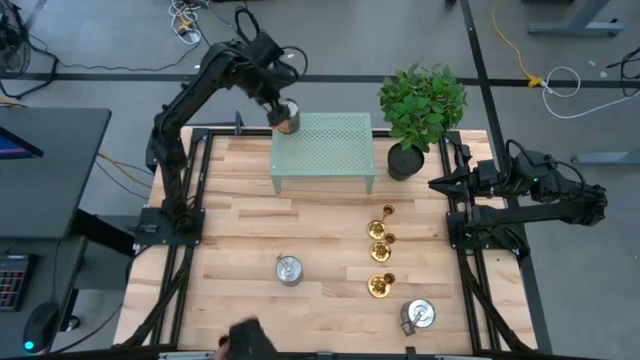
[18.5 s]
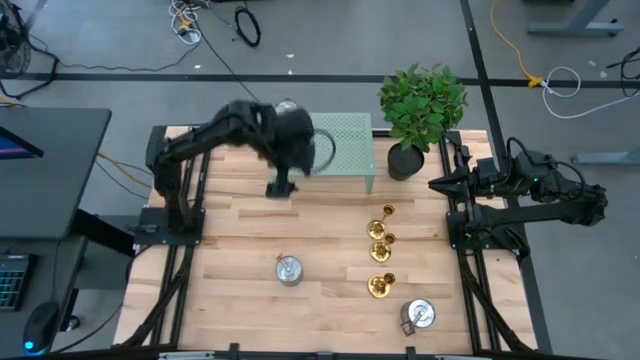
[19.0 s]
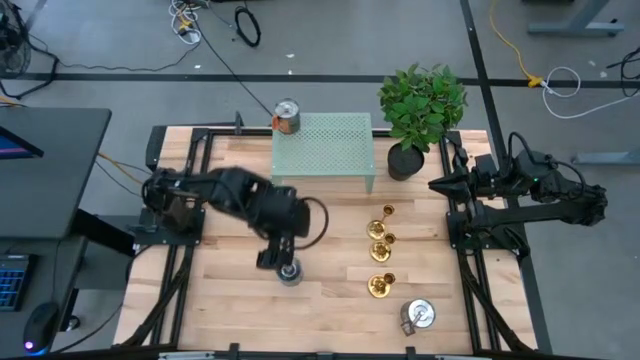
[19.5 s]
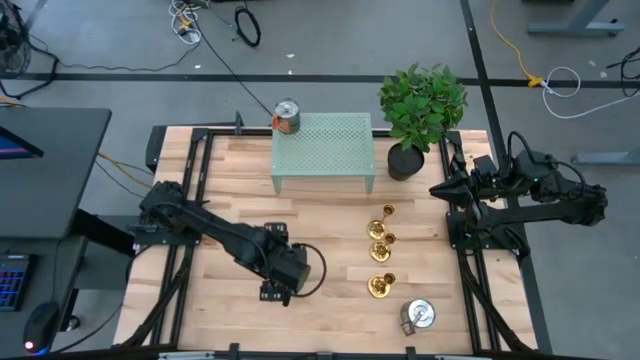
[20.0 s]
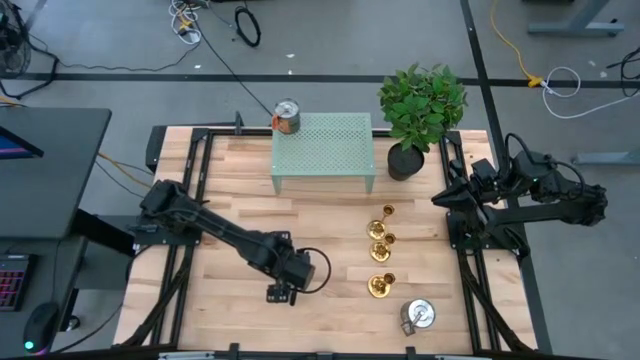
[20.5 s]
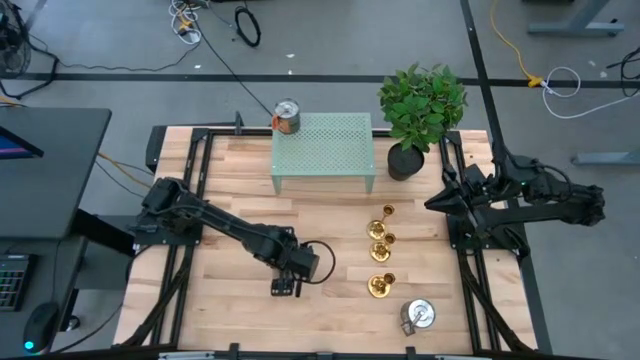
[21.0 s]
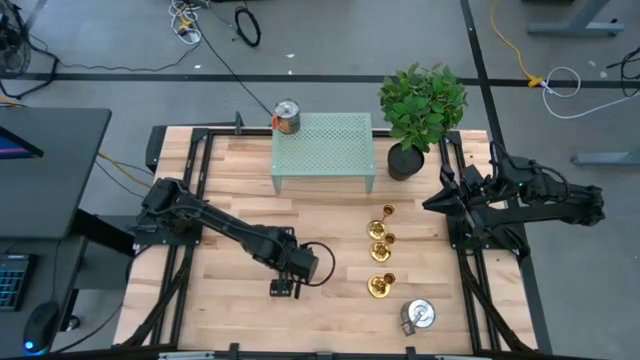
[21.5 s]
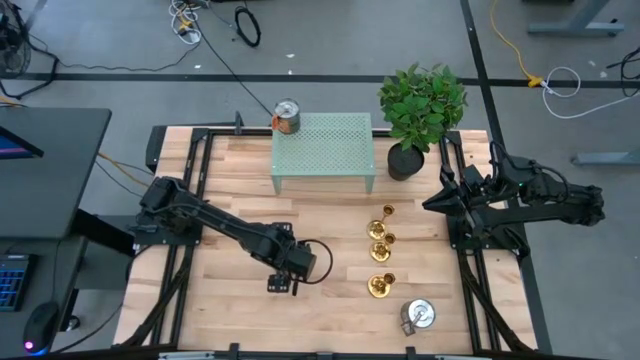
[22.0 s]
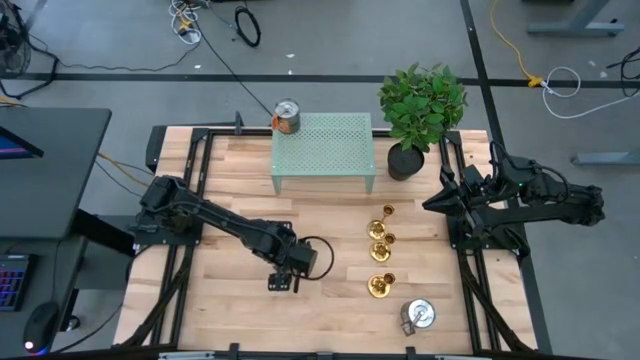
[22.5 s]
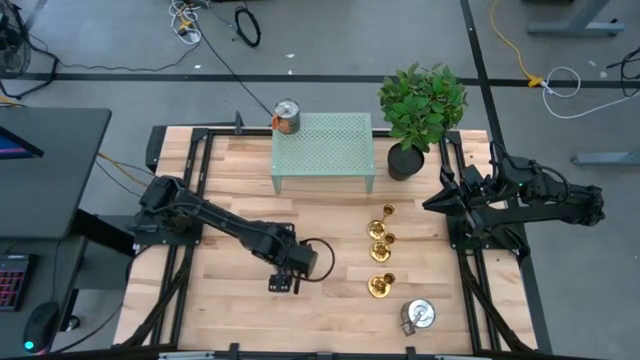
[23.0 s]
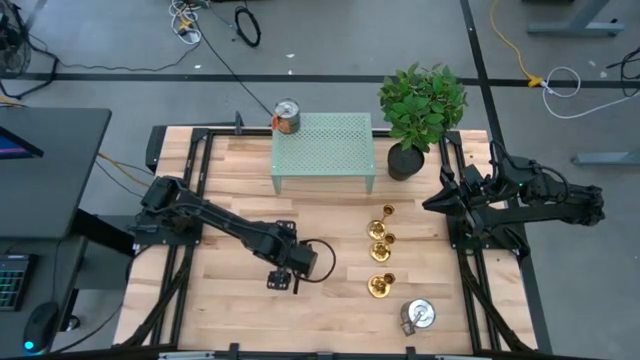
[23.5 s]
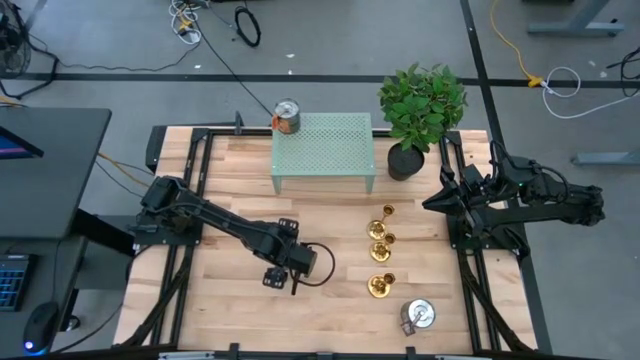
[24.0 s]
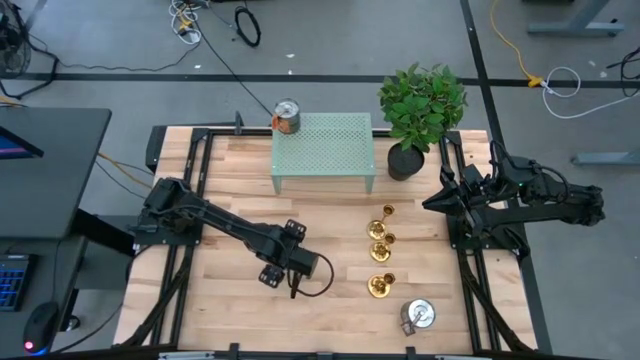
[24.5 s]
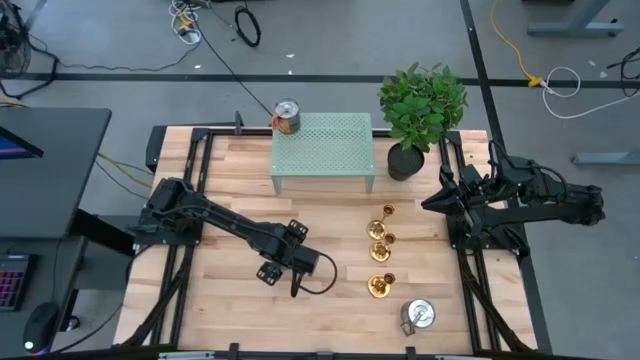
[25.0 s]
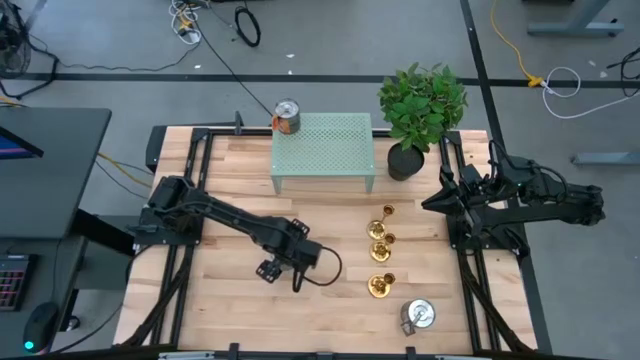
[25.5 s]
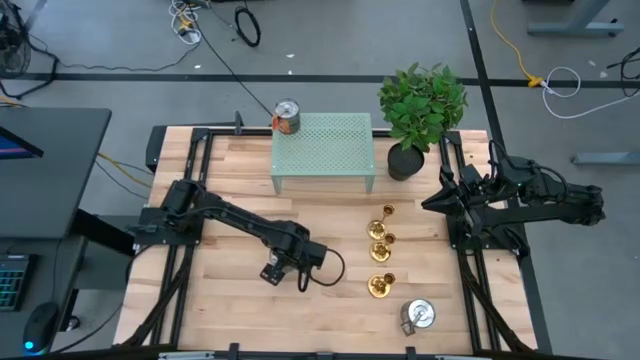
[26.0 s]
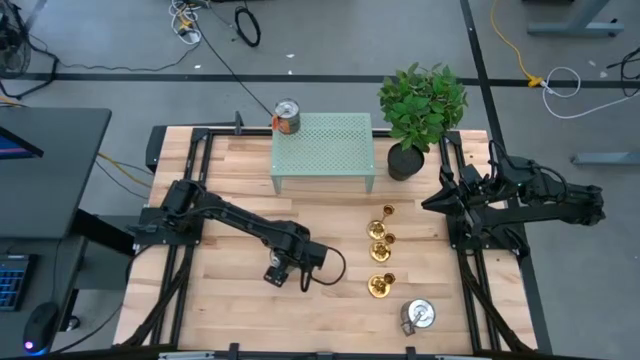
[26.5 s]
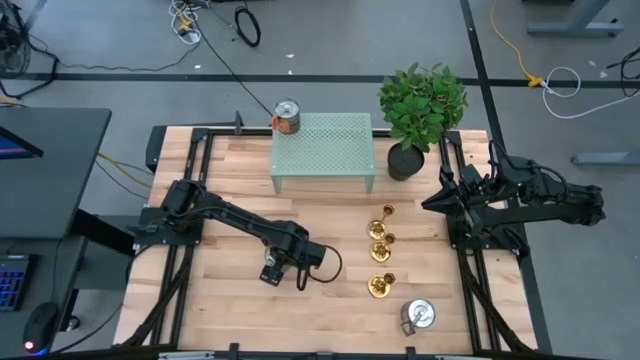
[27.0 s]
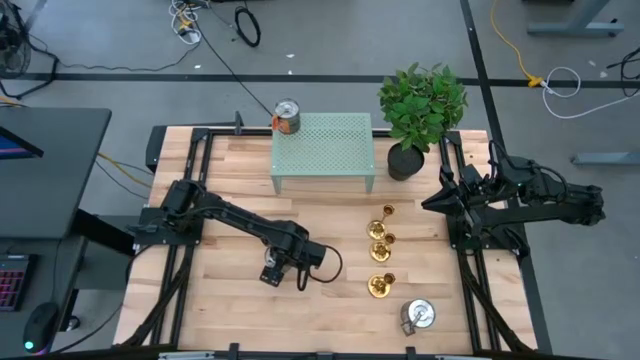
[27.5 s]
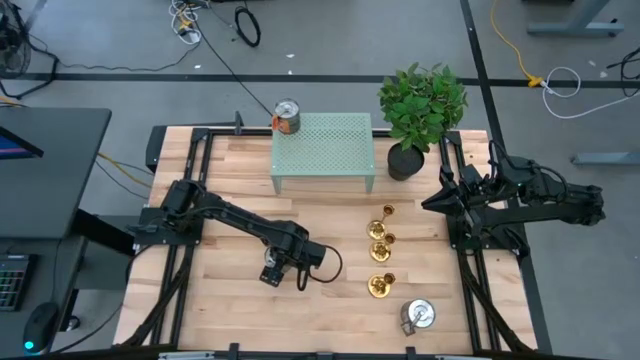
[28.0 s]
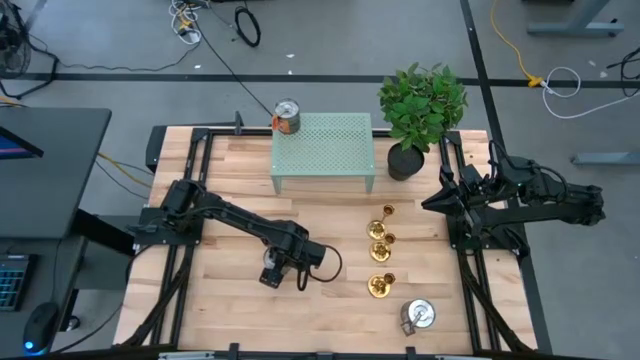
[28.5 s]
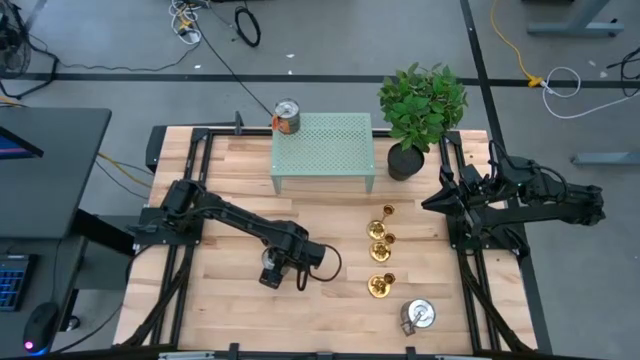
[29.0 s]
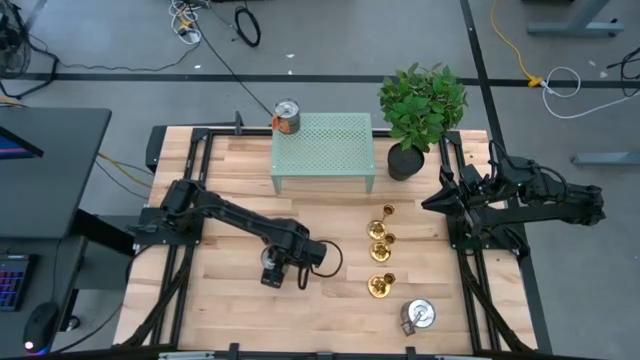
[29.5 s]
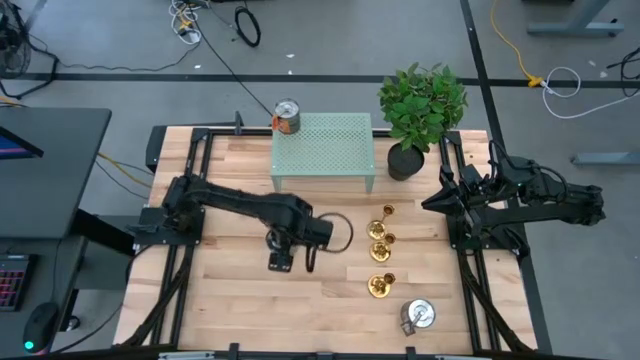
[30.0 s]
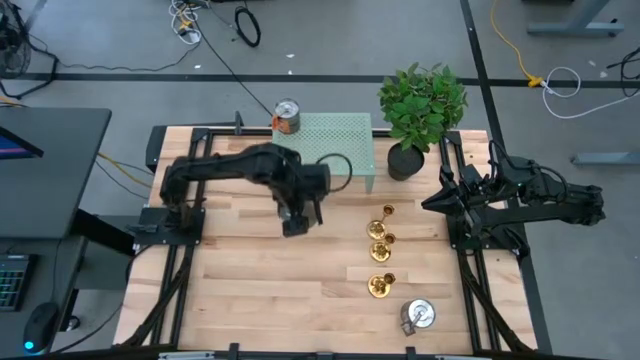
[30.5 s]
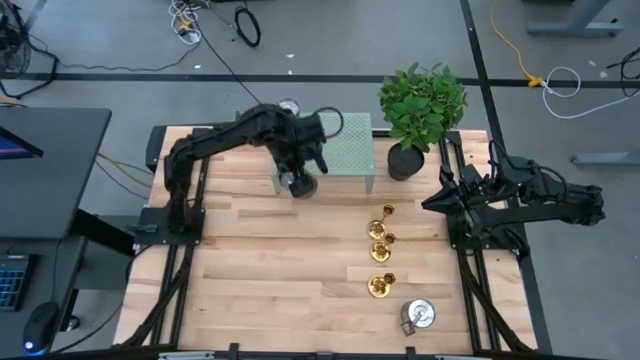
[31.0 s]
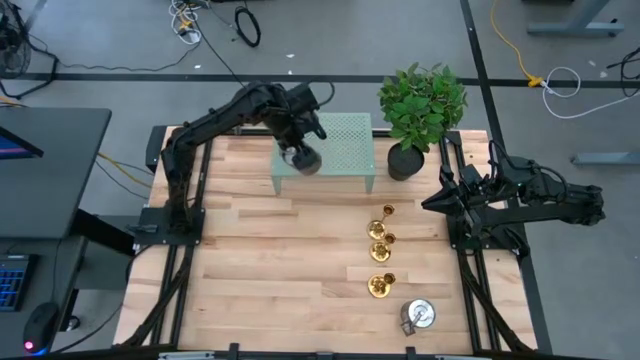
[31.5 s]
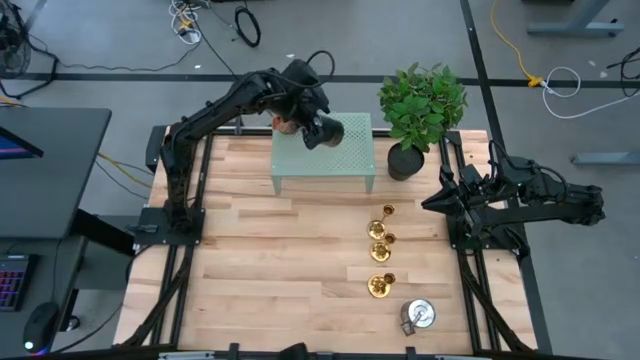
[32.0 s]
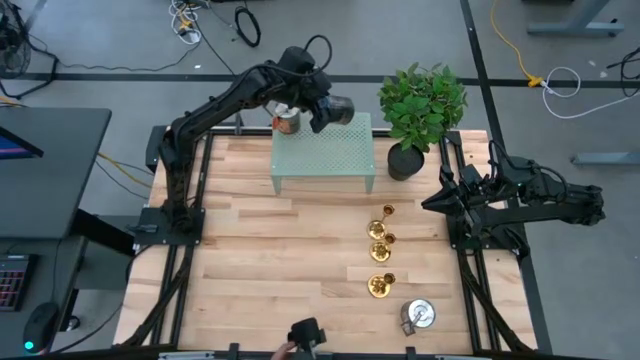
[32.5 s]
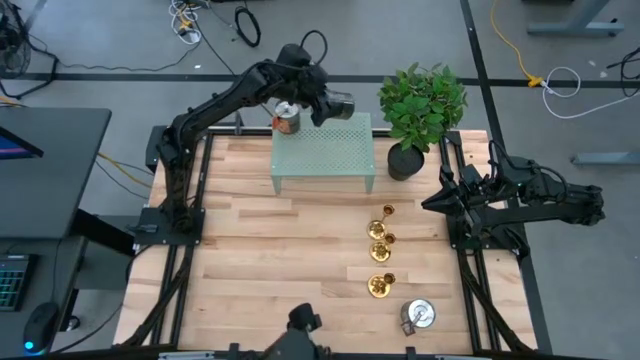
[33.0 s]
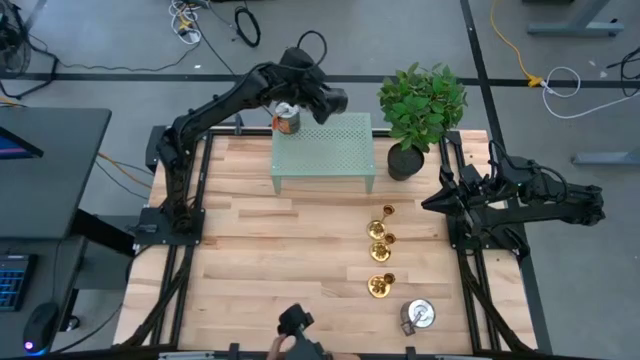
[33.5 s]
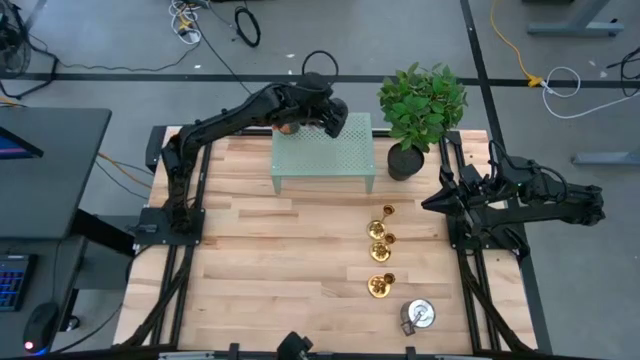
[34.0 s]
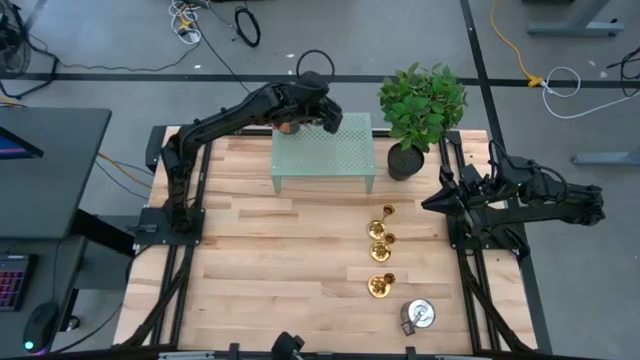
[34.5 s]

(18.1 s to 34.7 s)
Task: Pick & Place candle stick holders
Put the left silver scented candle on the shelf aligned with the other silver scented candle

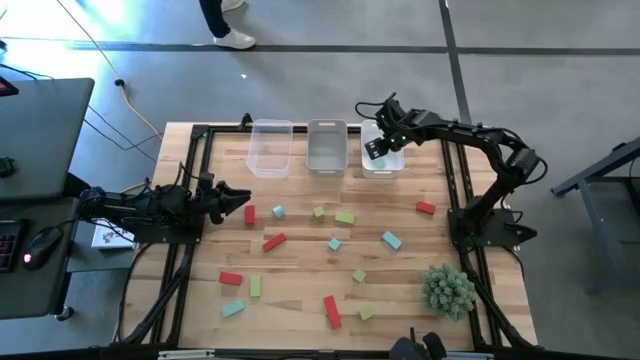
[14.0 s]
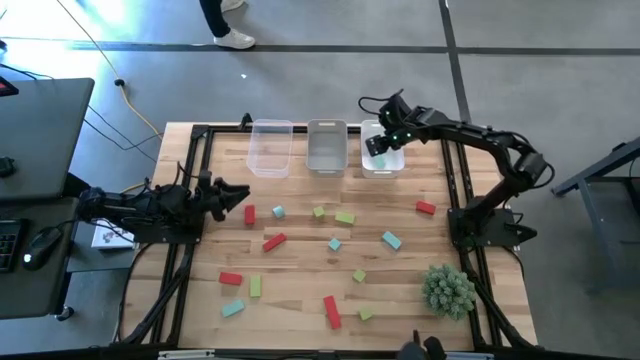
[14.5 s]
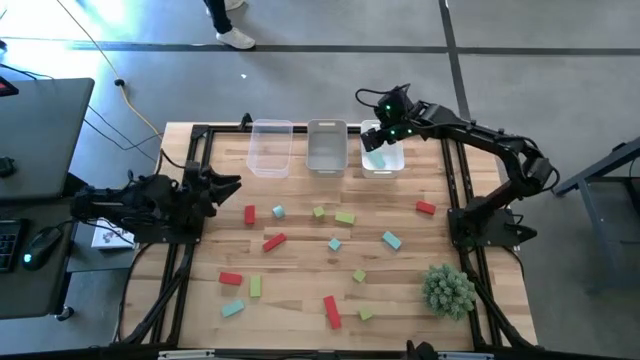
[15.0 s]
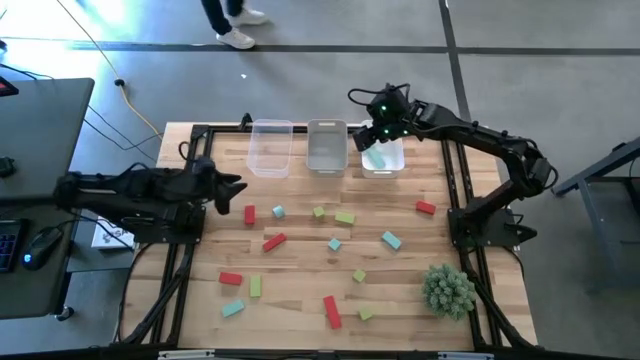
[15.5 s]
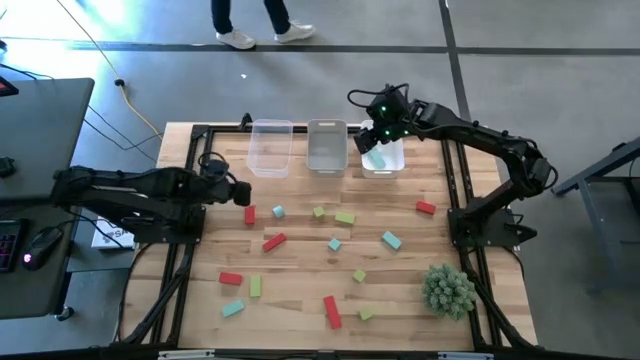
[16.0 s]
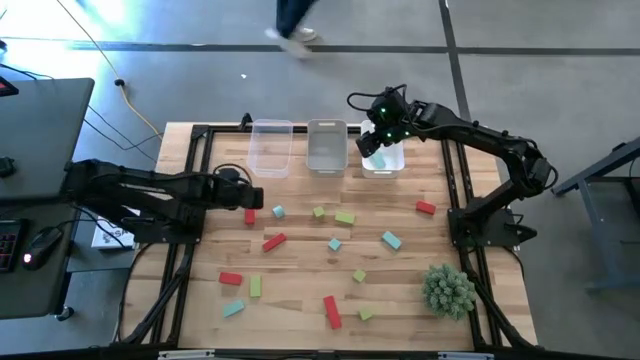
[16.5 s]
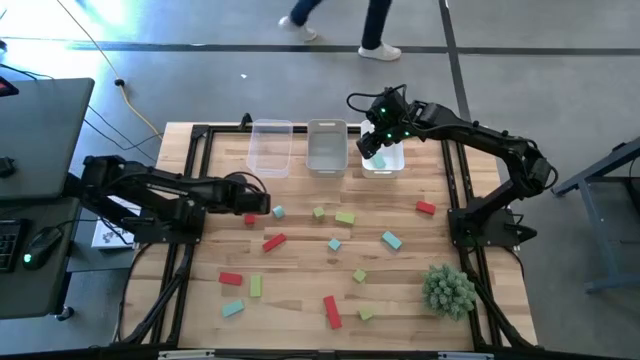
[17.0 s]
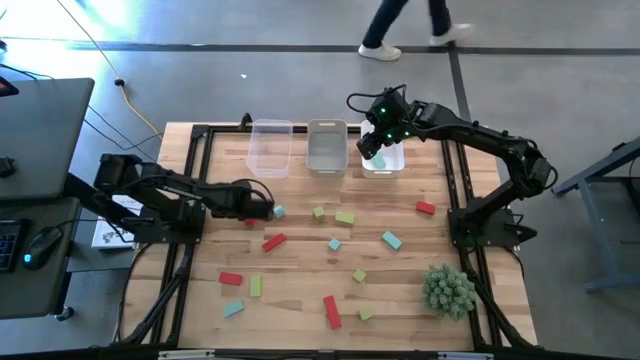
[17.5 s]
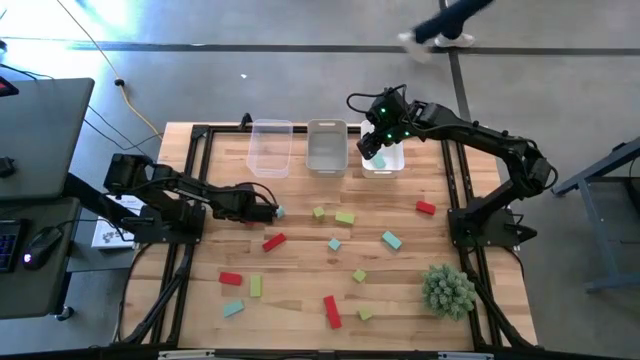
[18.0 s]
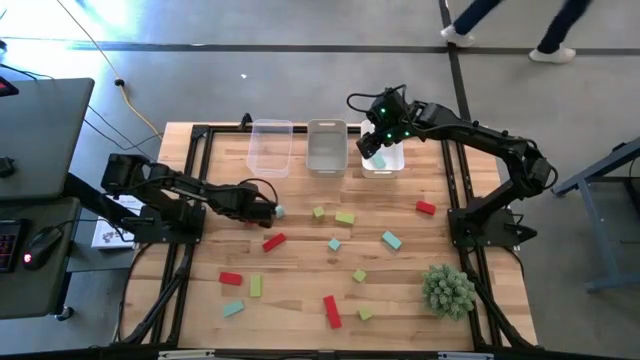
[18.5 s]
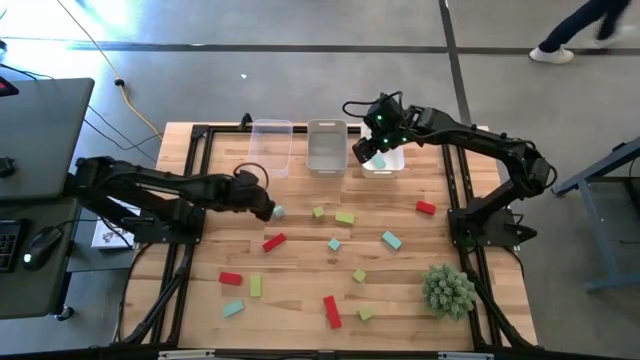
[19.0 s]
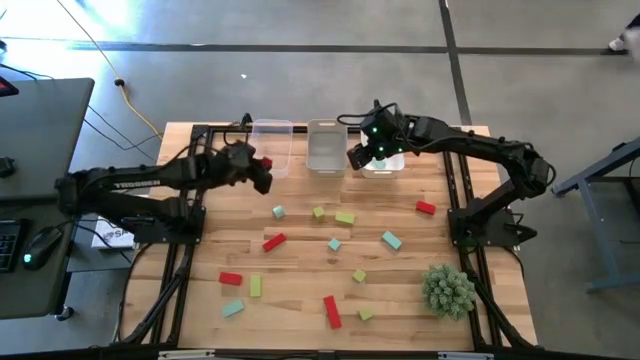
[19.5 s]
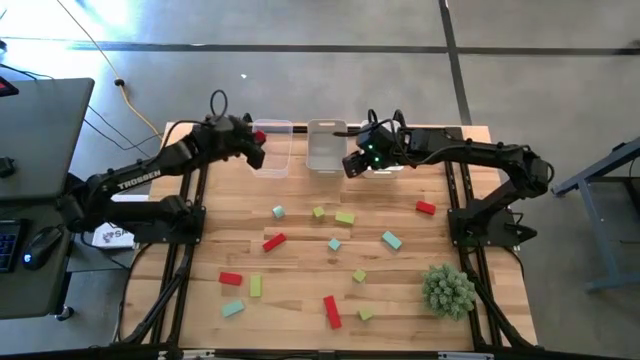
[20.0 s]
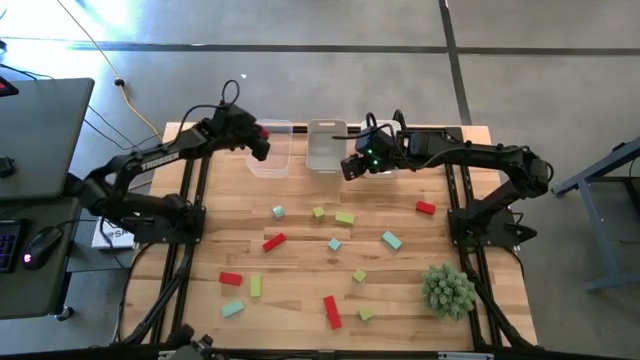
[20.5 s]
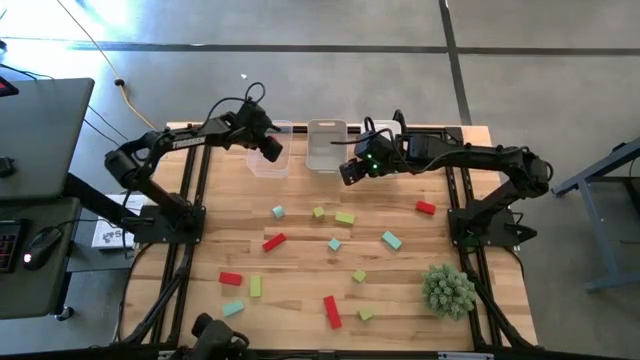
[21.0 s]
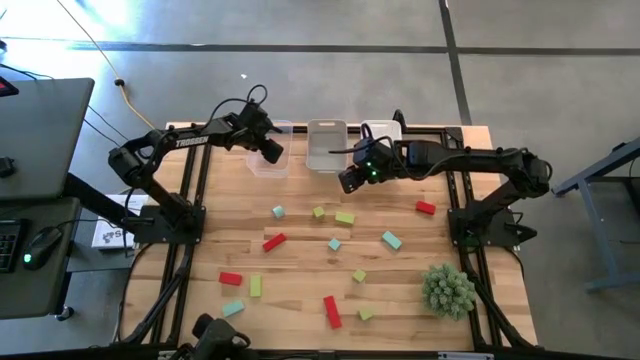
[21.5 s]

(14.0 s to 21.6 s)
Task: Sort & place blocks by color
Put the red block into the transparent bin
